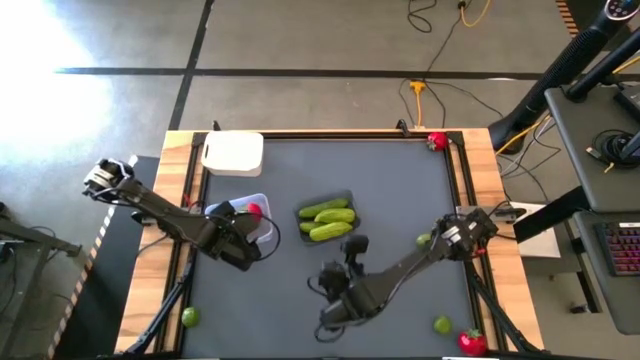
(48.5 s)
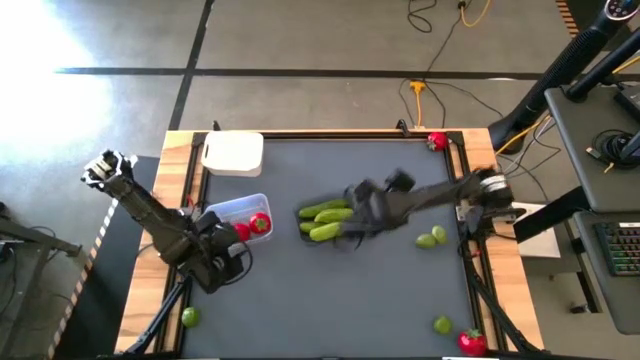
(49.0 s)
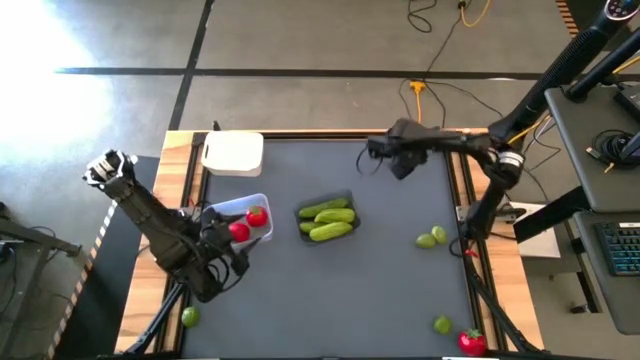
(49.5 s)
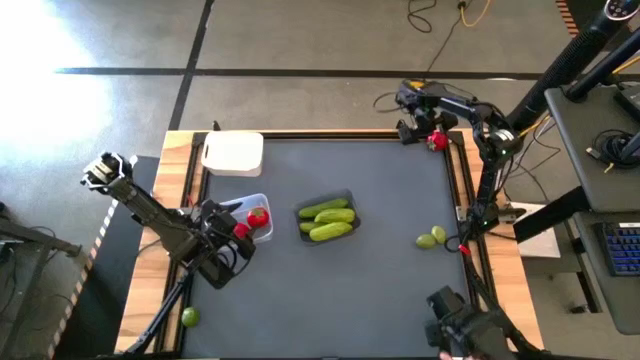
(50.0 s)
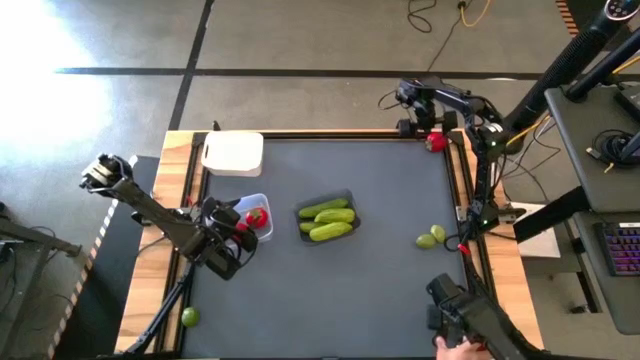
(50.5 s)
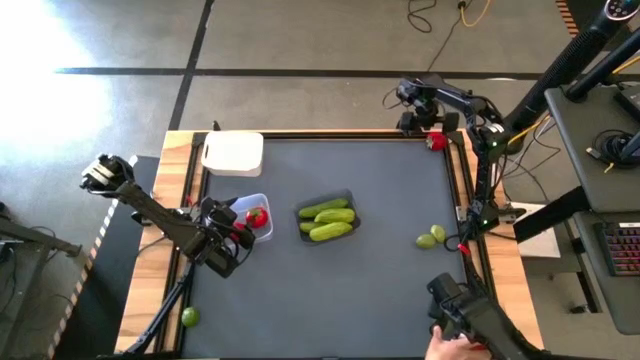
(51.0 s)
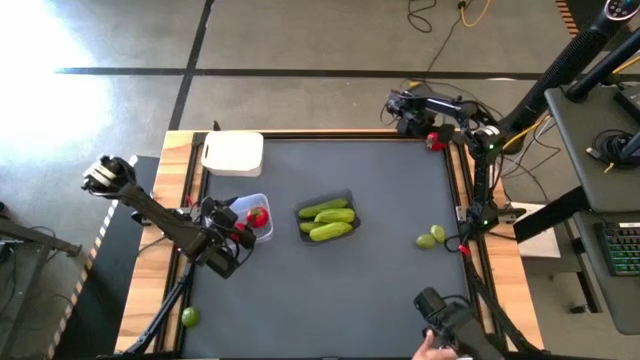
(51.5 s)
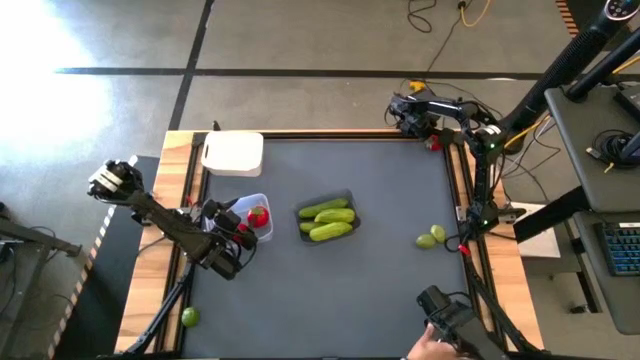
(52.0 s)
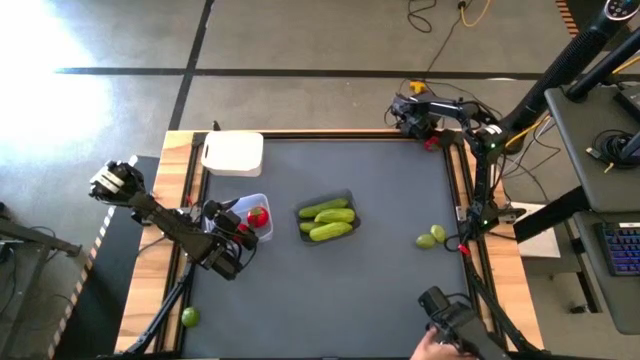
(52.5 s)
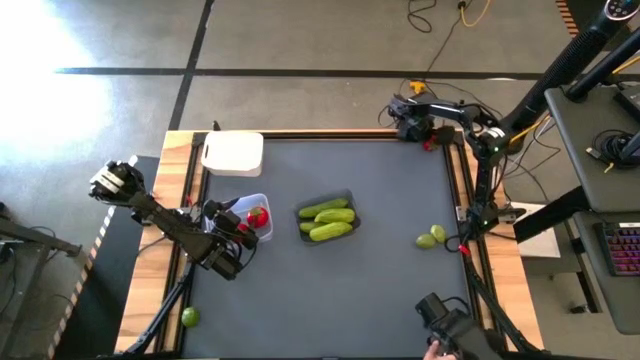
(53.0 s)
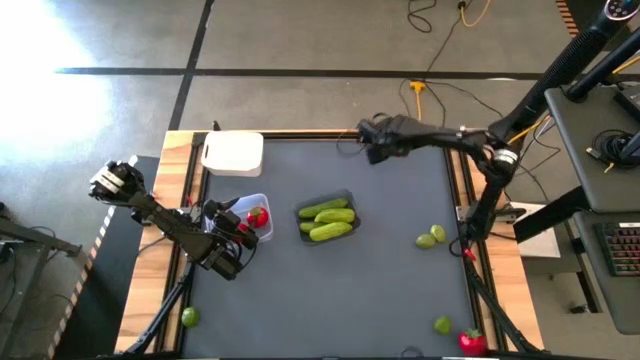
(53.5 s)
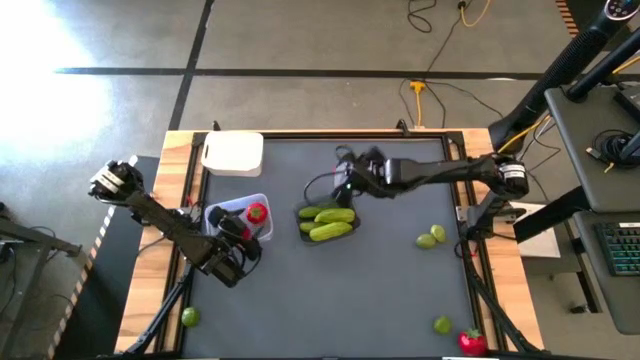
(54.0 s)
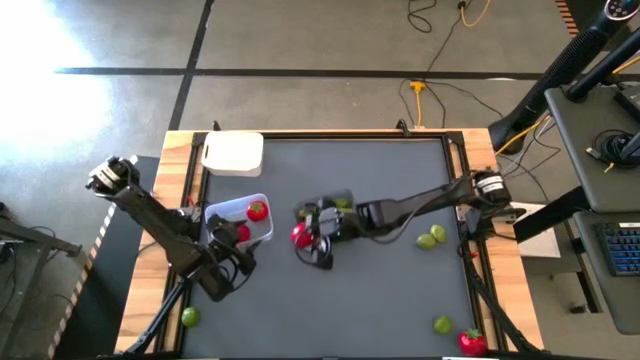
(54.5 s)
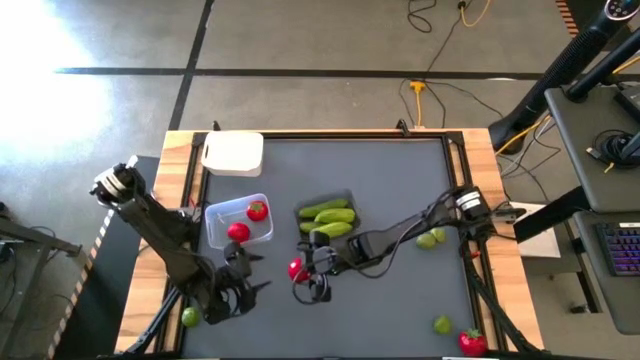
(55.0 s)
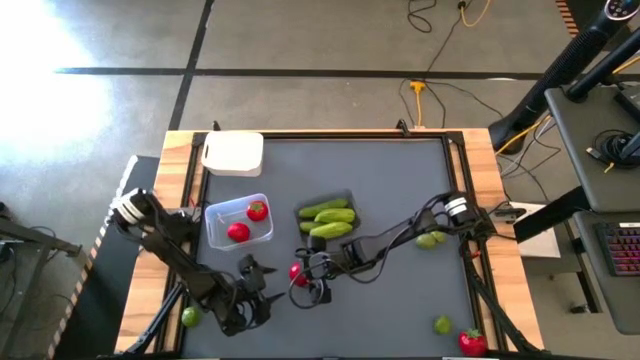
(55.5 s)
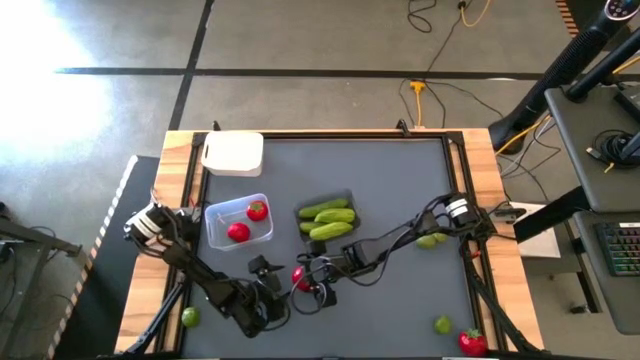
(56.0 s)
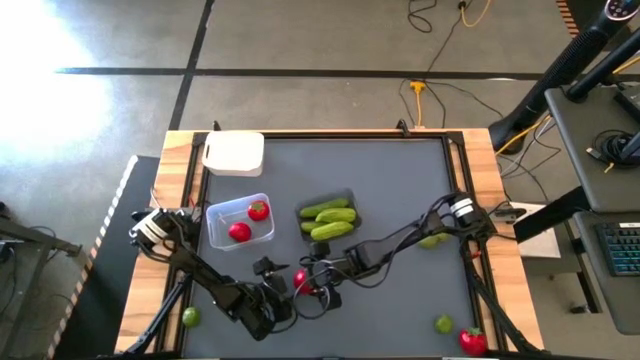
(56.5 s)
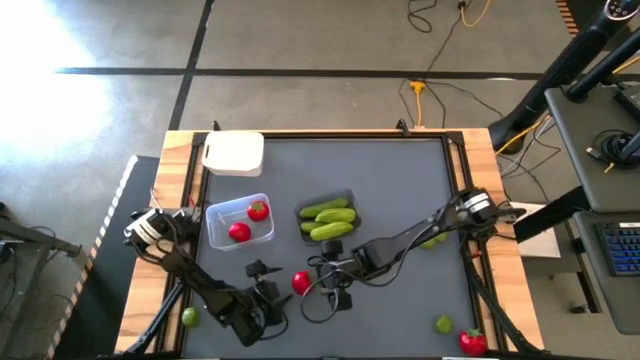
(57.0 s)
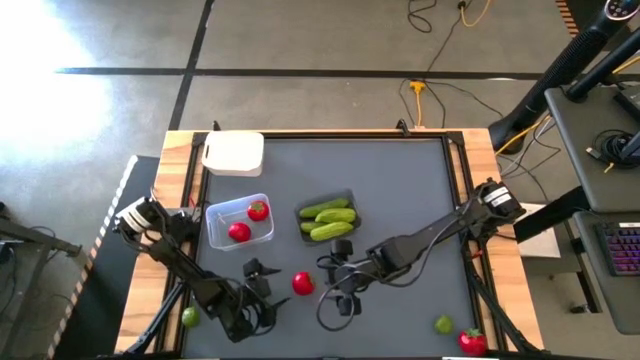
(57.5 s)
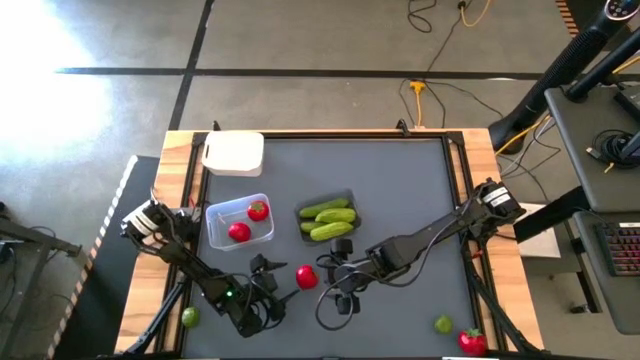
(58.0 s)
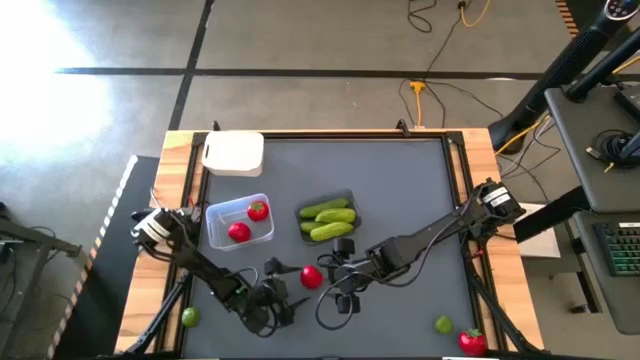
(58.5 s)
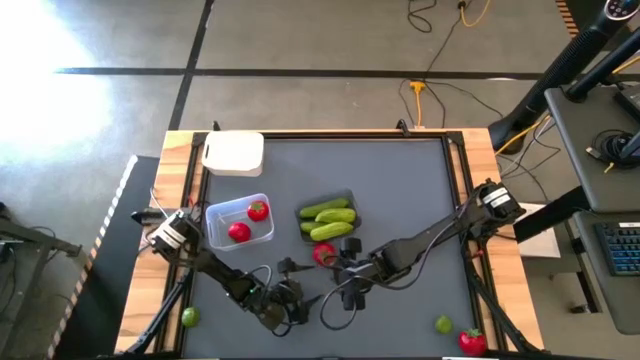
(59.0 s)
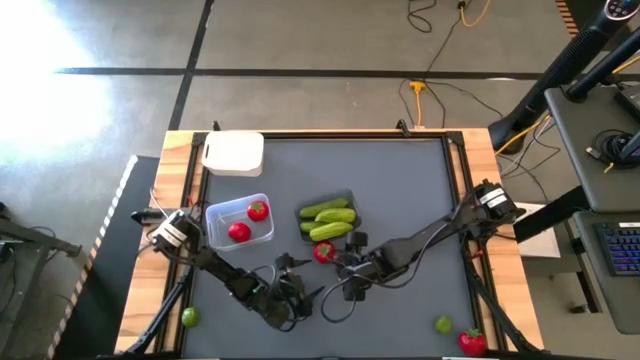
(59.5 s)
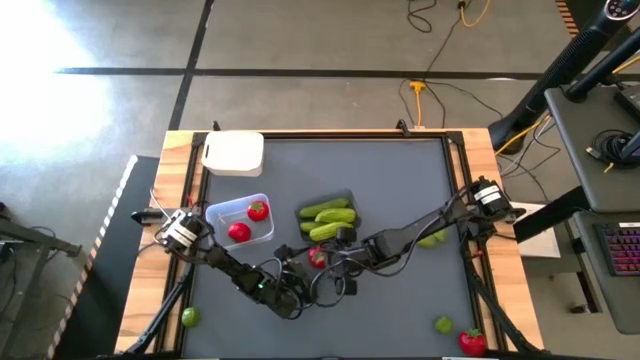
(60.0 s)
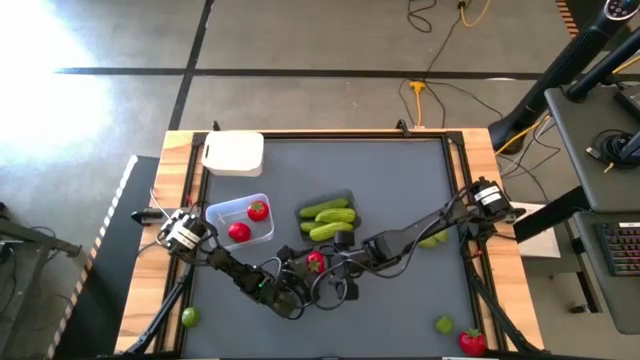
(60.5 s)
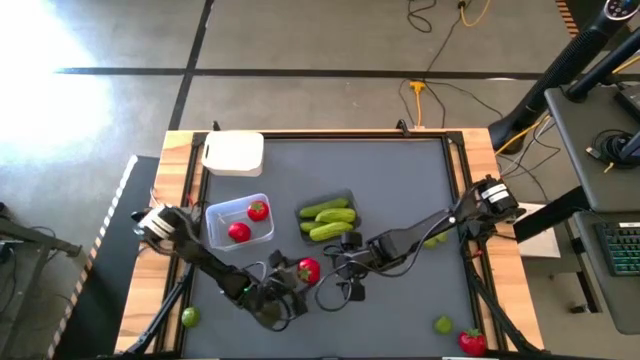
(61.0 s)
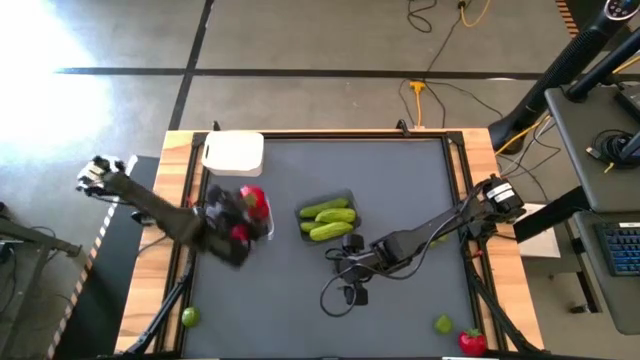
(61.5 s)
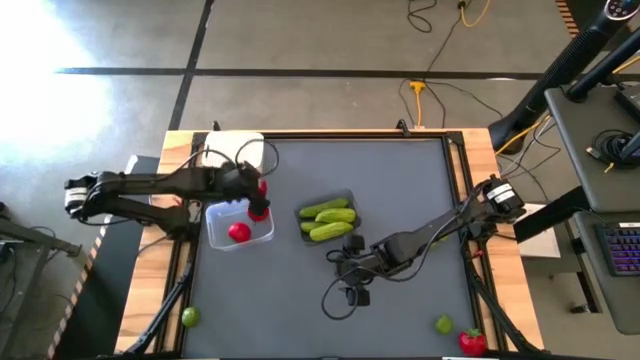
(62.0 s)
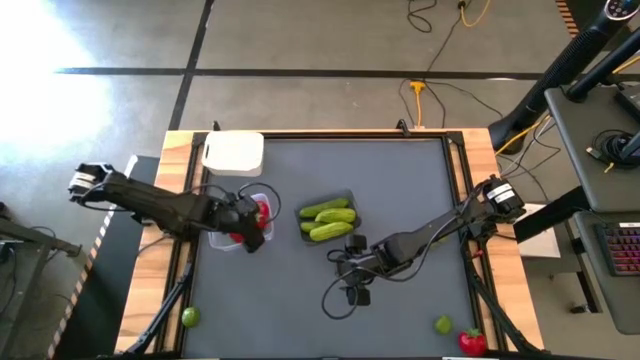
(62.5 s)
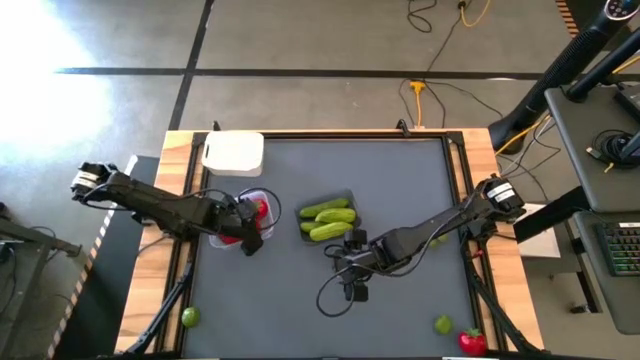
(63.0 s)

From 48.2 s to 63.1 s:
Task: Sort produce into baskets
Put the tomato into the transparent bin

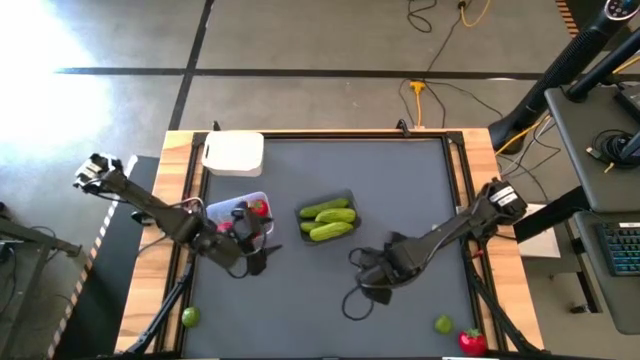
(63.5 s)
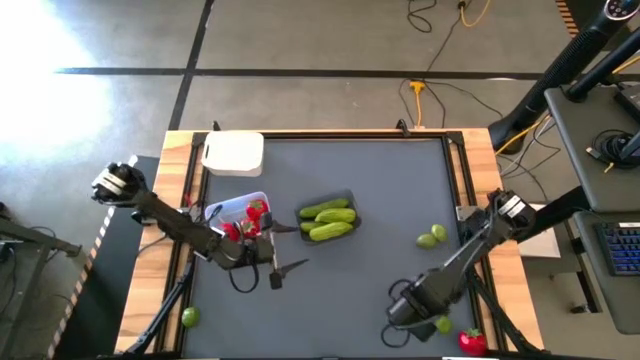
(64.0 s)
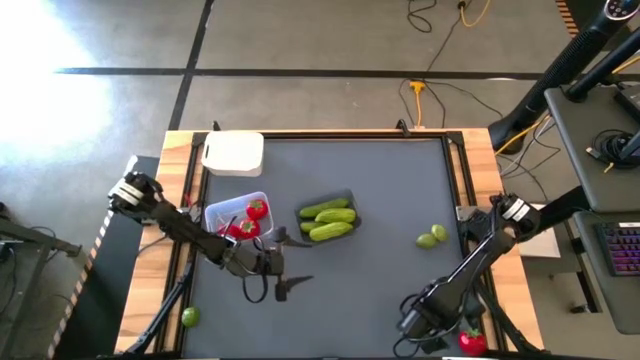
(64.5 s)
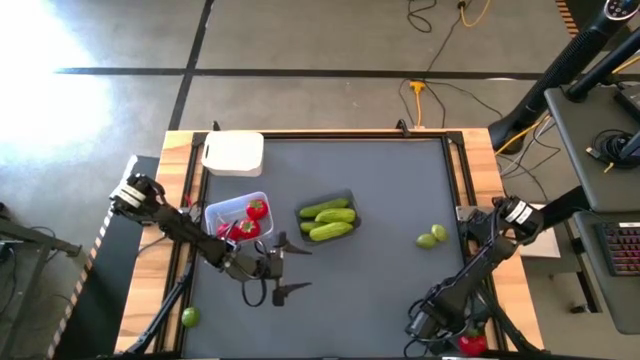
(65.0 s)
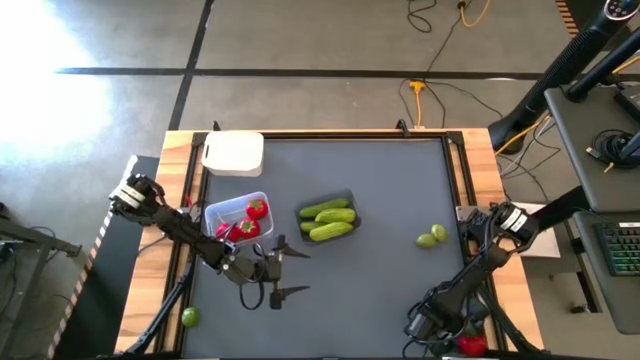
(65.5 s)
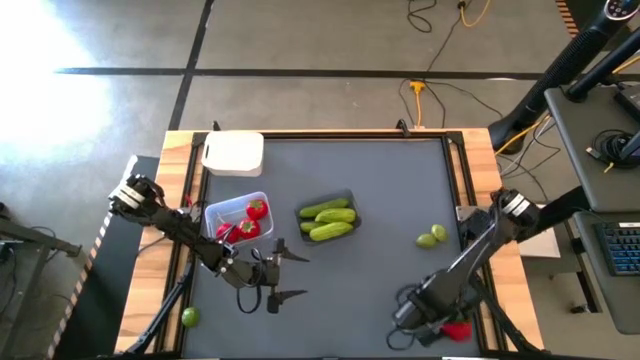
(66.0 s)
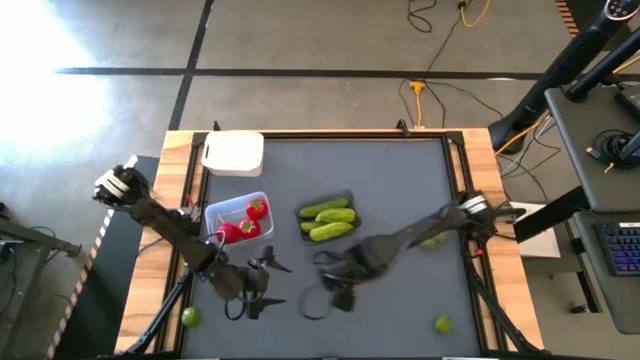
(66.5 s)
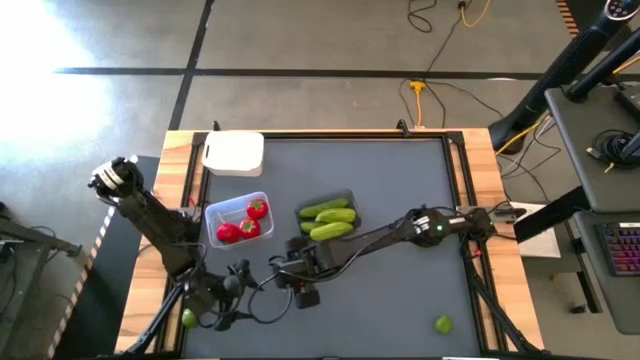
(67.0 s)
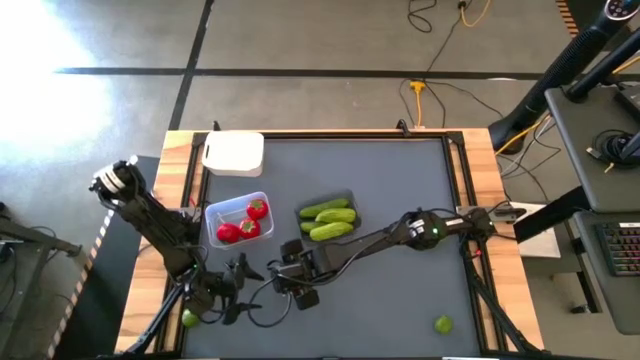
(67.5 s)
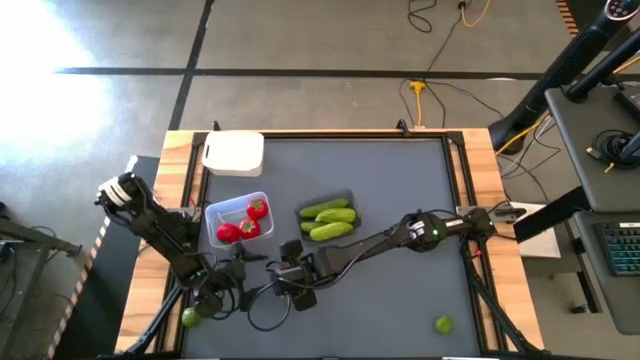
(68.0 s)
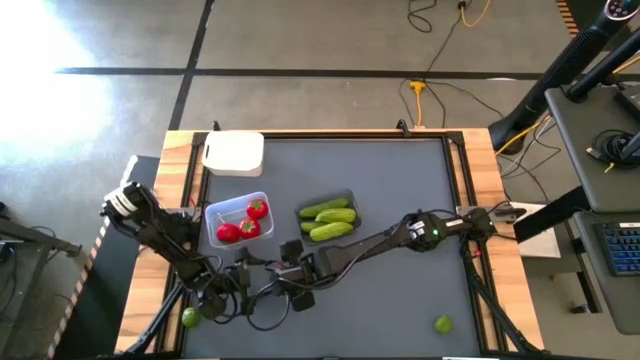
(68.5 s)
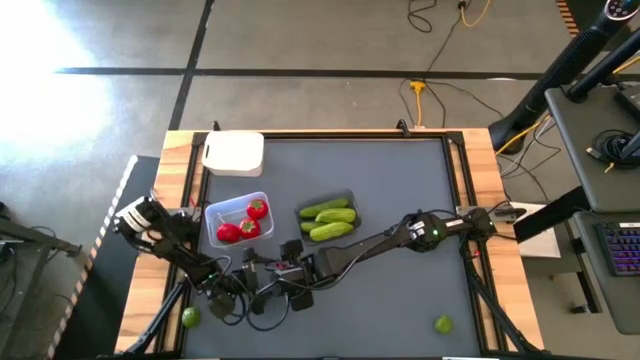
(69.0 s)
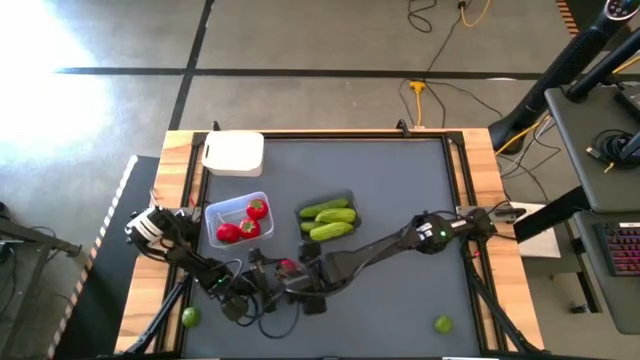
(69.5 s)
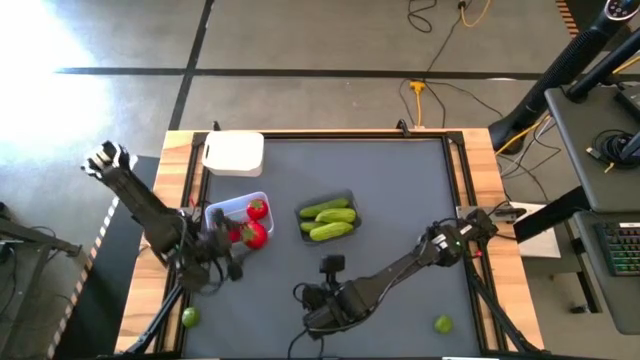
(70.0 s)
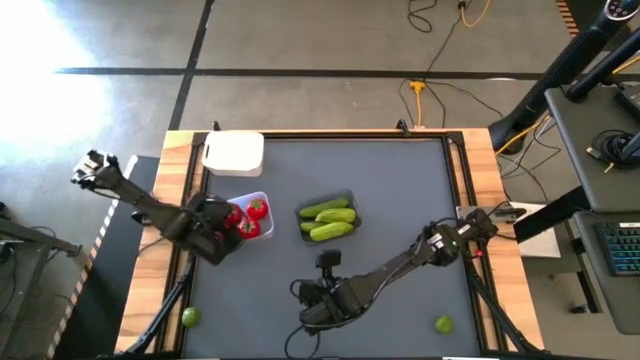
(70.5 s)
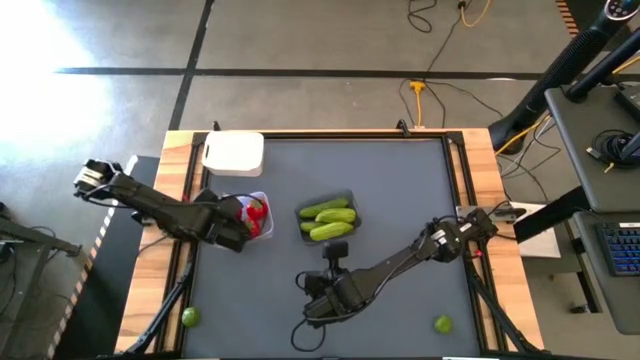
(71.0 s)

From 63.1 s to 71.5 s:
Put the tomato into the transparent bin
